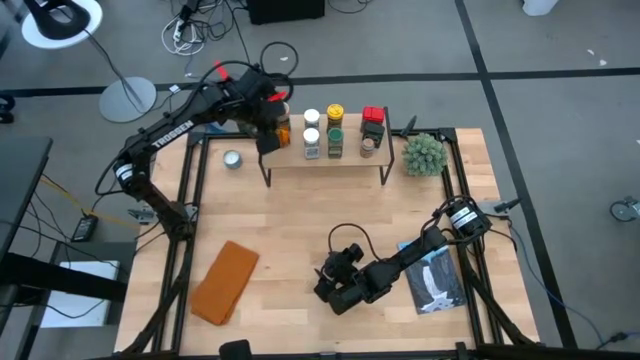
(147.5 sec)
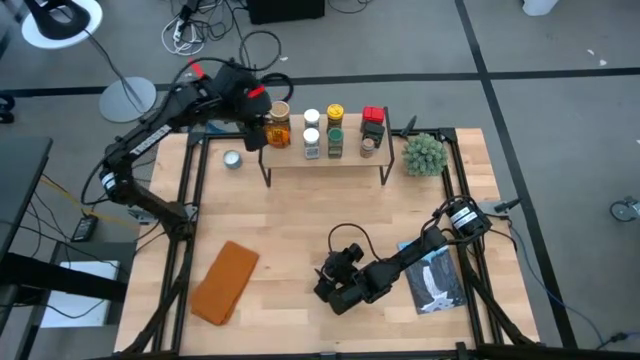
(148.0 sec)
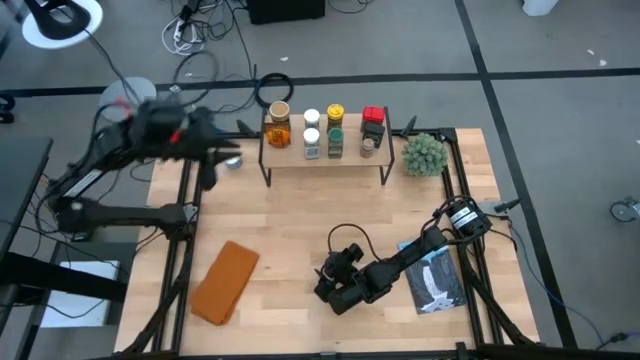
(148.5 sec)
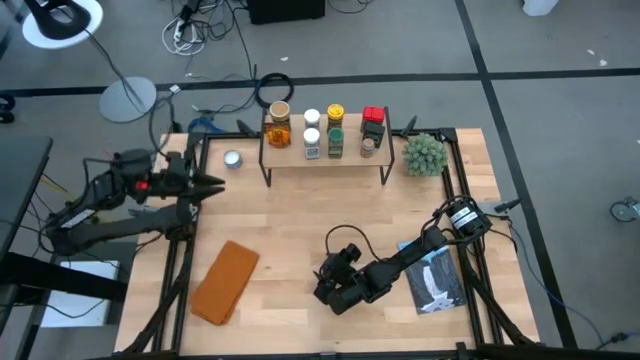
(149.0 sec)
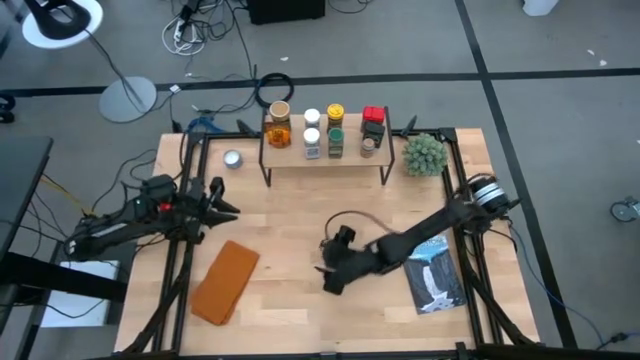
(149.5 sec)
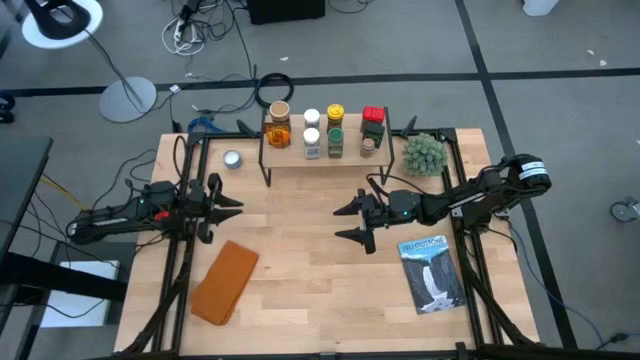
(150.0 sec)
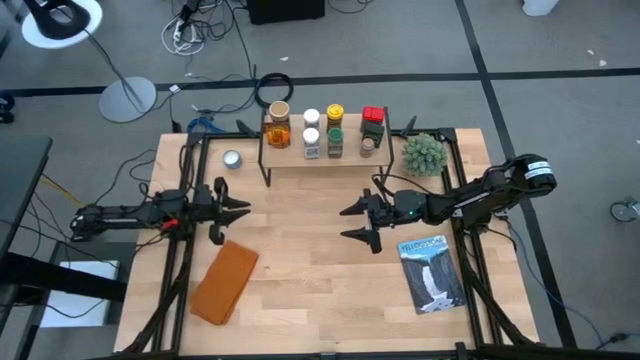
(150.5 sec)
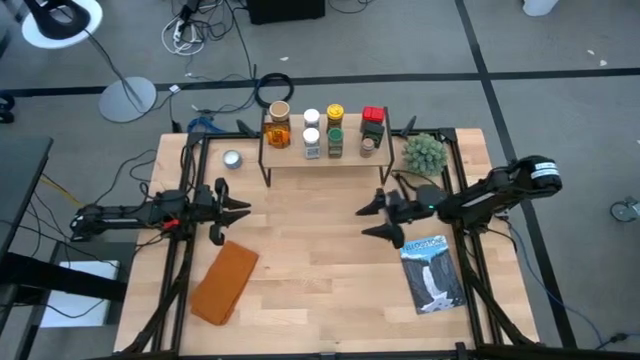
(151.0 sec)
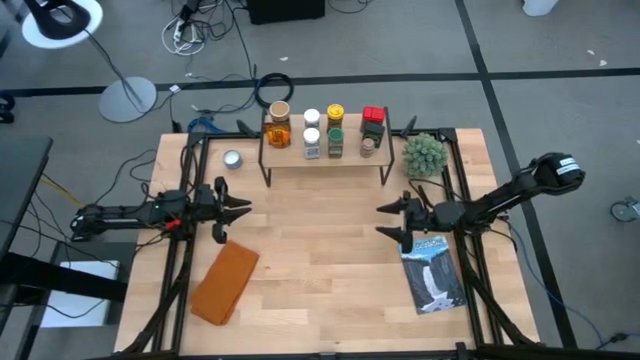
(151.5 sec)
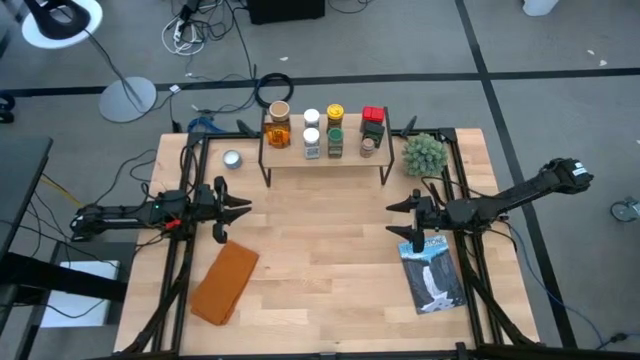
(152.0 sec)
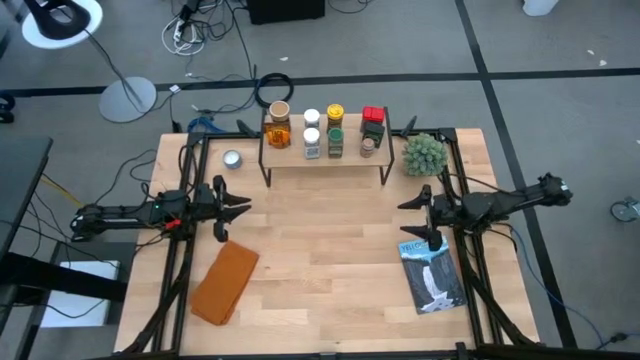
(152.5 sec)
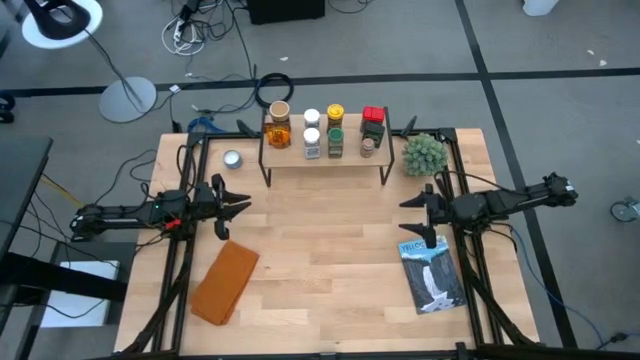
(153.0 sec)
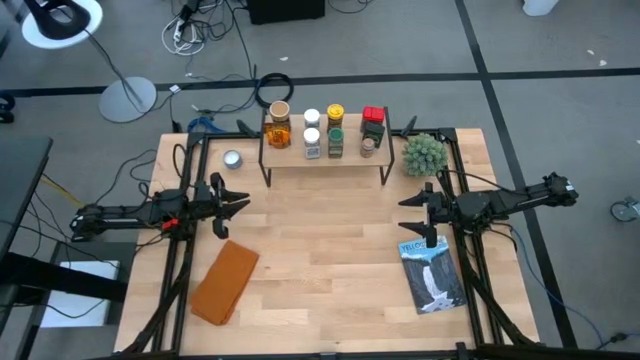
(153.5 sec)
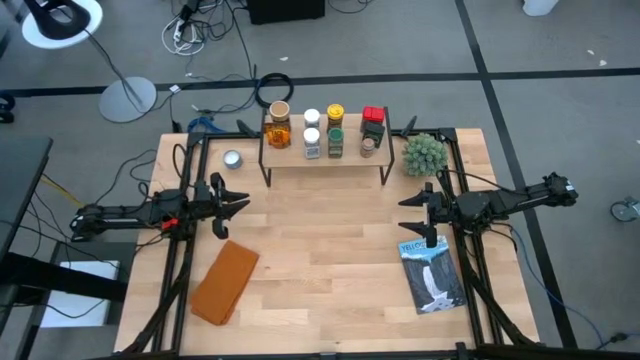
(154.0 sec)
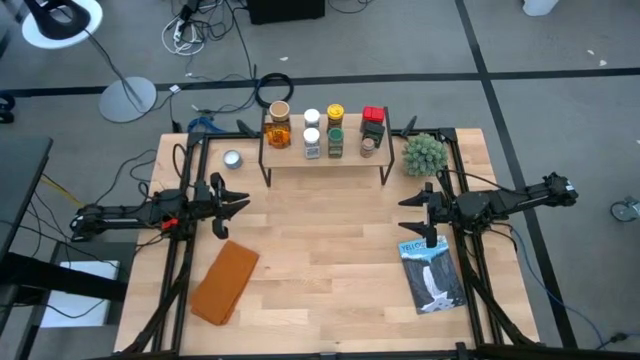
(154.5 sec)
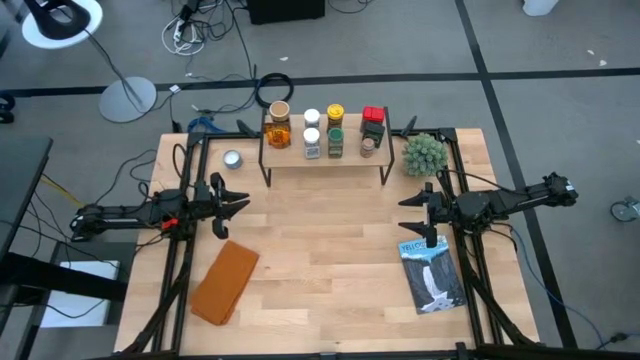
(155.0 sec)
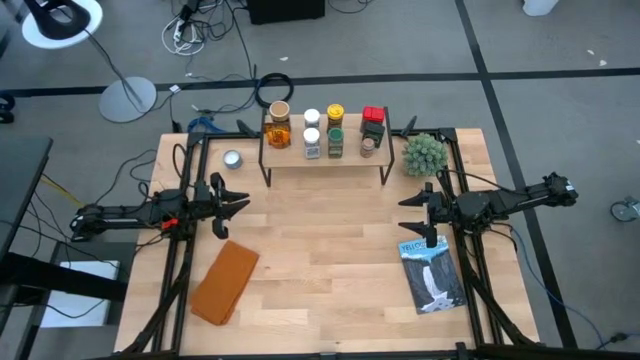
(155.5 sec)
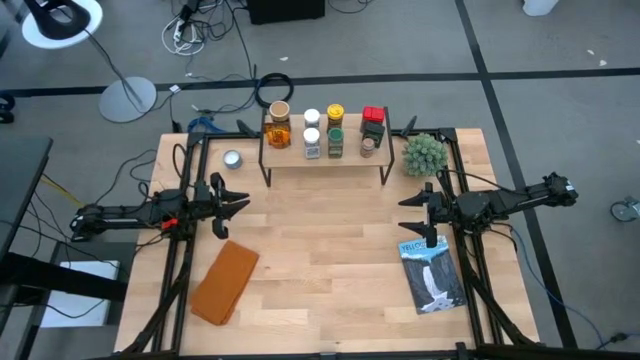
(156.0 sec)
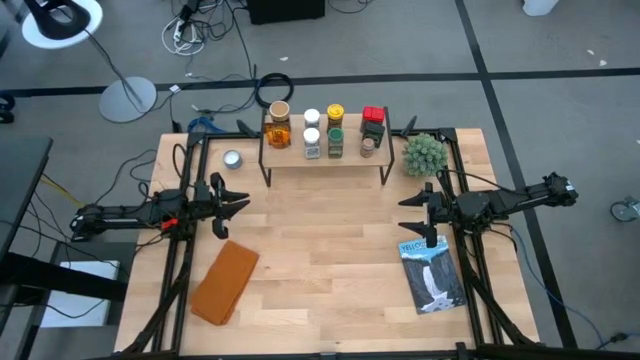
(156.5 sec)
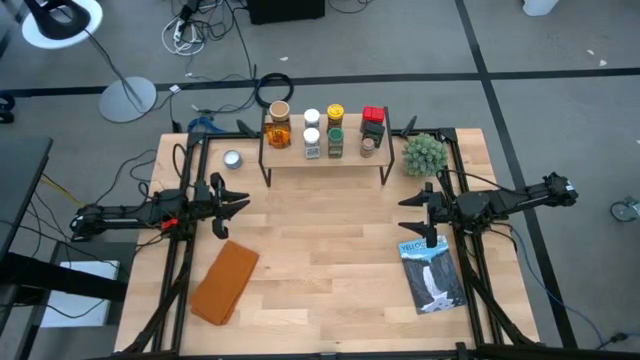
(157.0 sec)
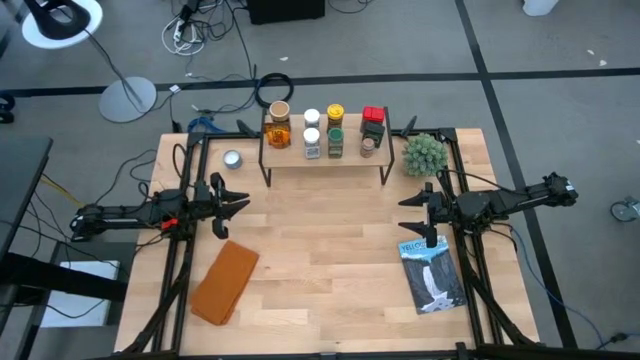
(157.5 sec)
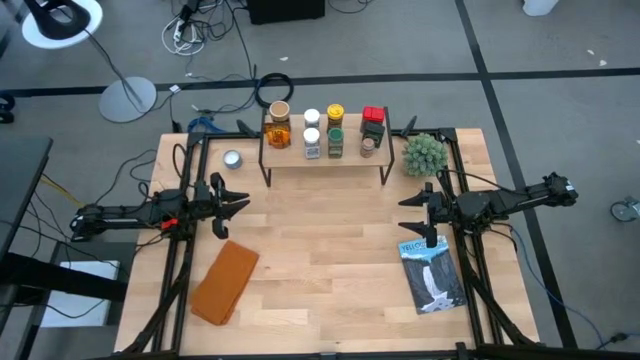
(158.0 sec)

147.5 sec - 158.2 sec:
Task: Shelf spices
Return to Home Position

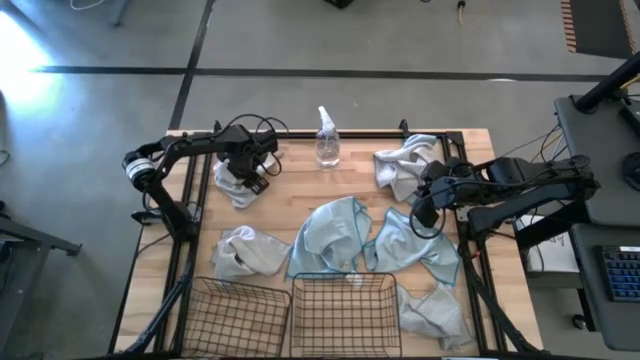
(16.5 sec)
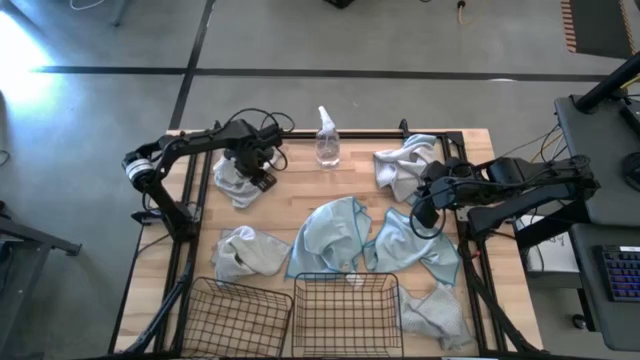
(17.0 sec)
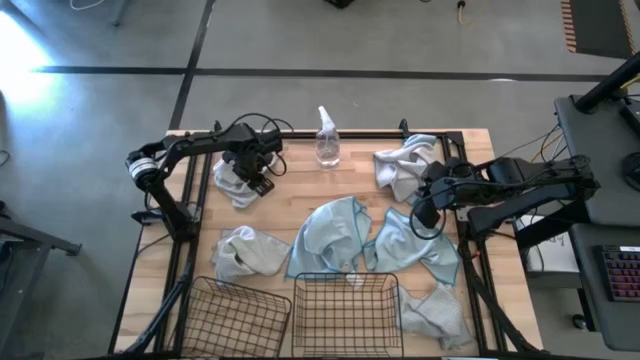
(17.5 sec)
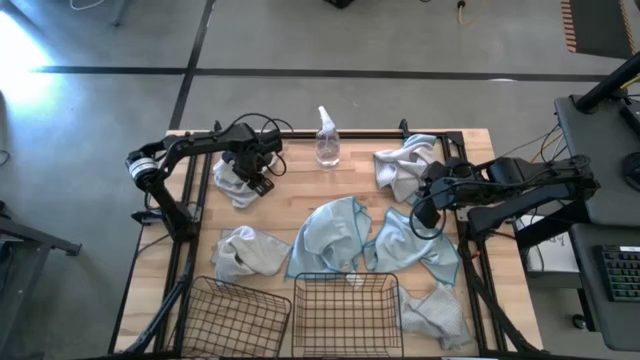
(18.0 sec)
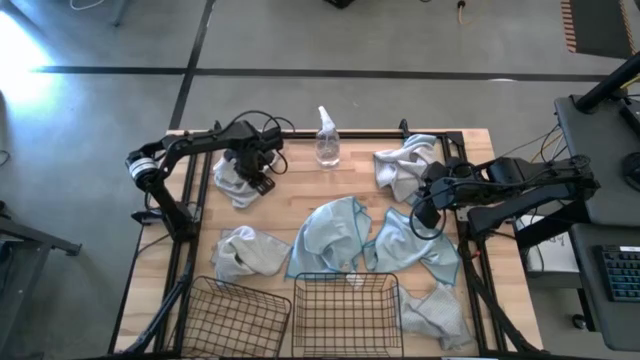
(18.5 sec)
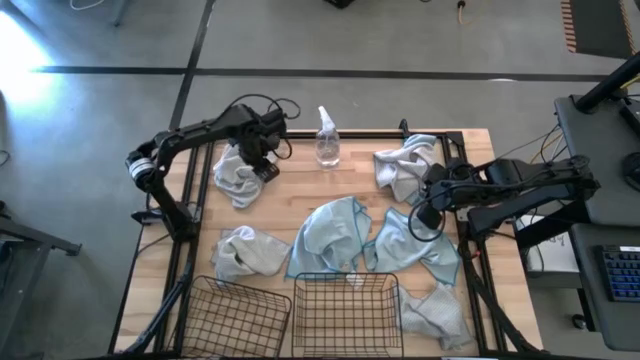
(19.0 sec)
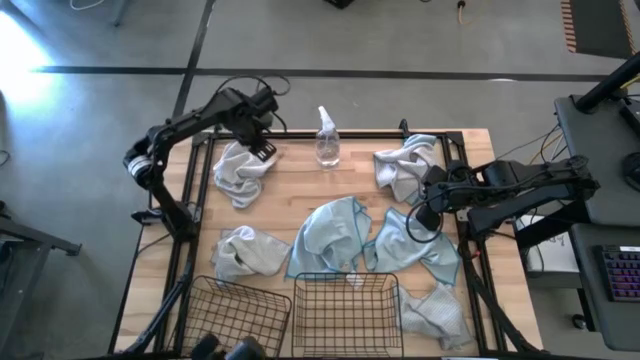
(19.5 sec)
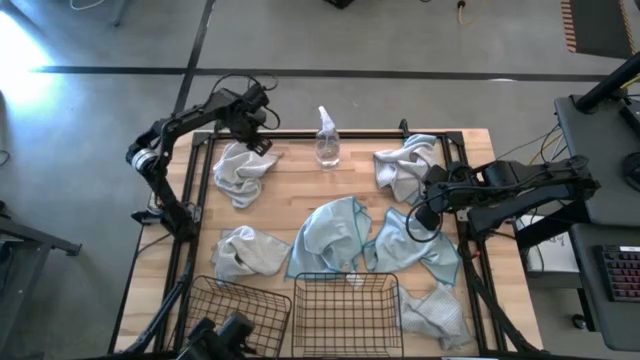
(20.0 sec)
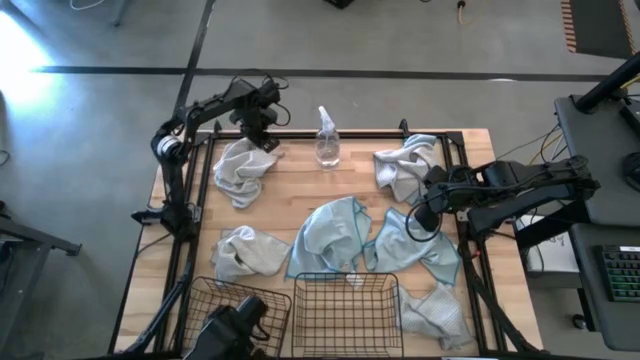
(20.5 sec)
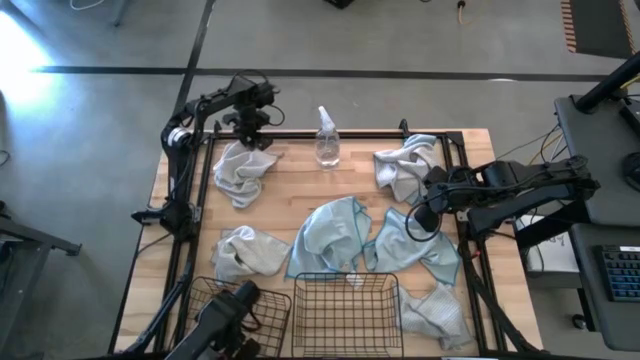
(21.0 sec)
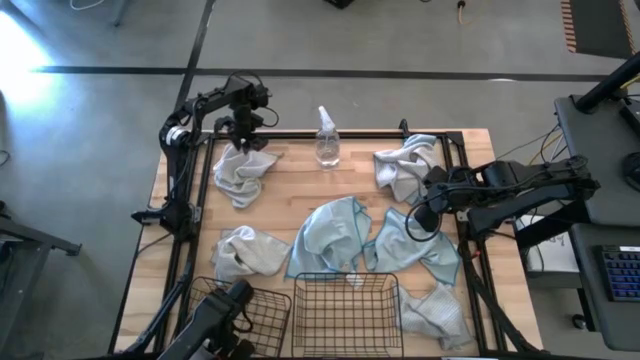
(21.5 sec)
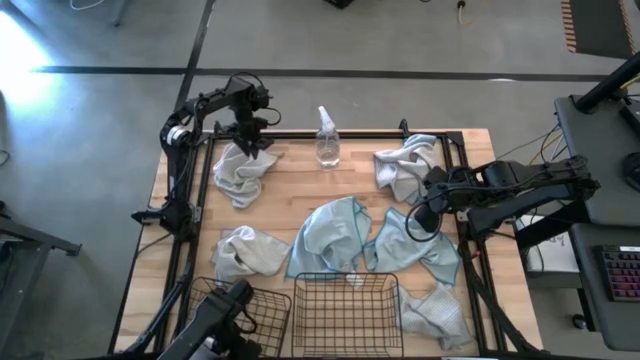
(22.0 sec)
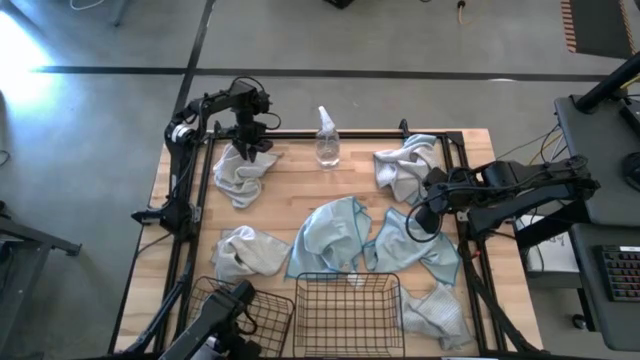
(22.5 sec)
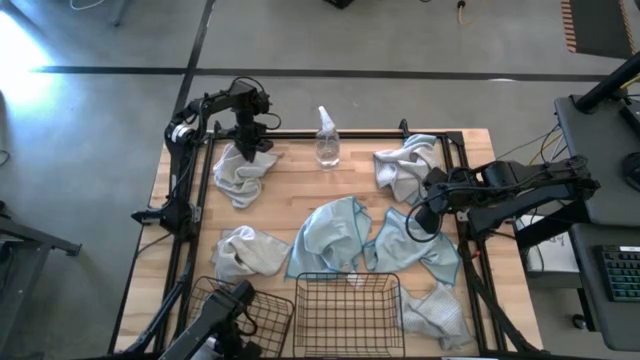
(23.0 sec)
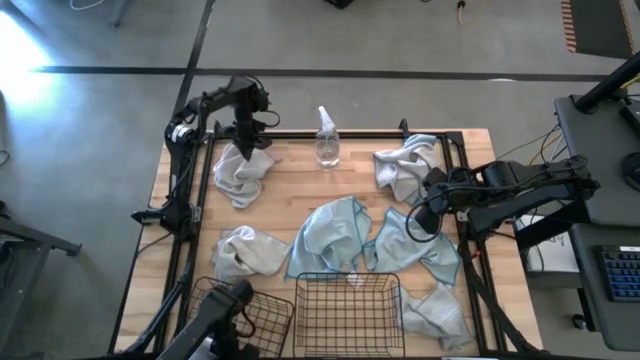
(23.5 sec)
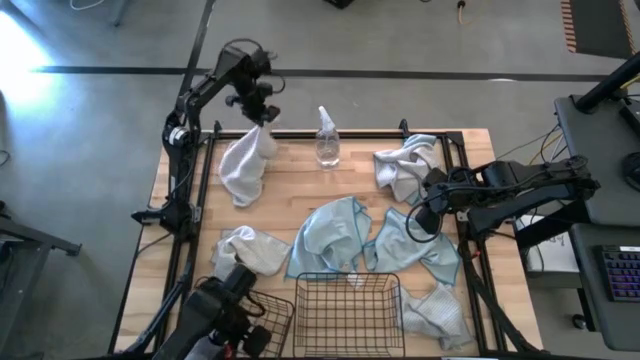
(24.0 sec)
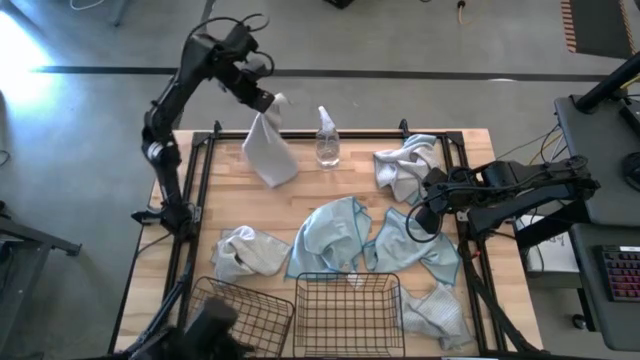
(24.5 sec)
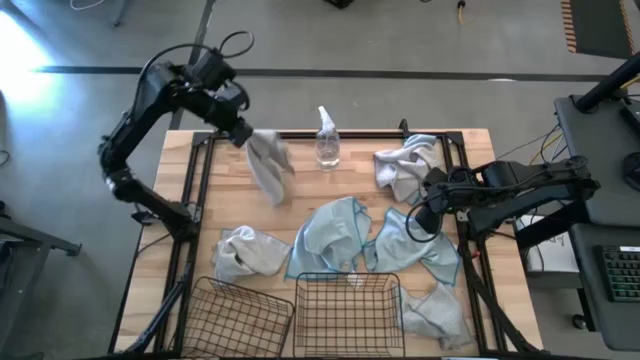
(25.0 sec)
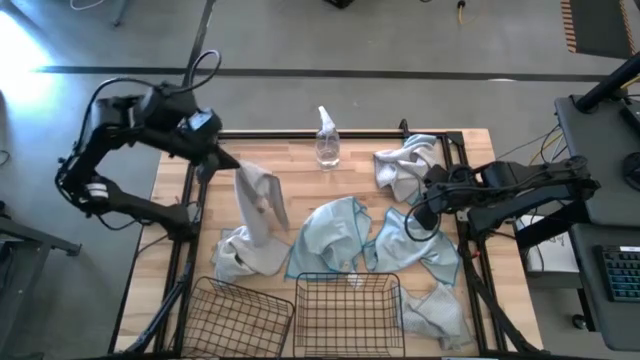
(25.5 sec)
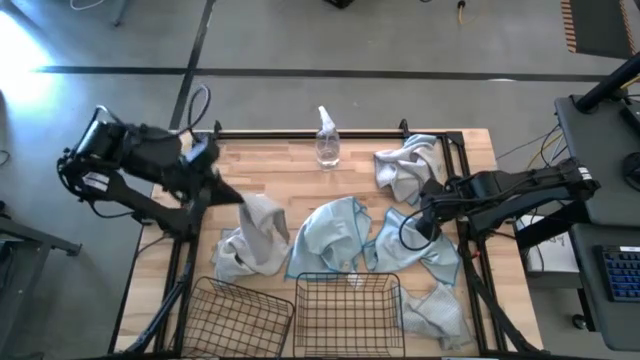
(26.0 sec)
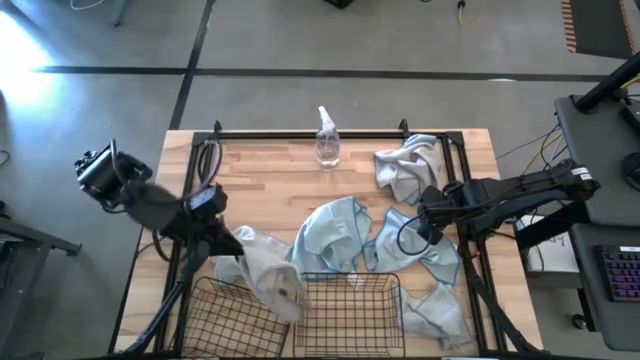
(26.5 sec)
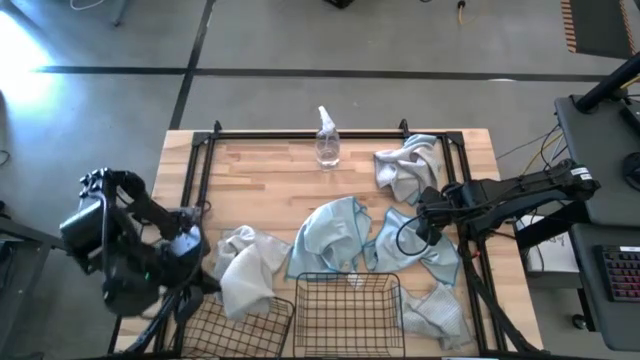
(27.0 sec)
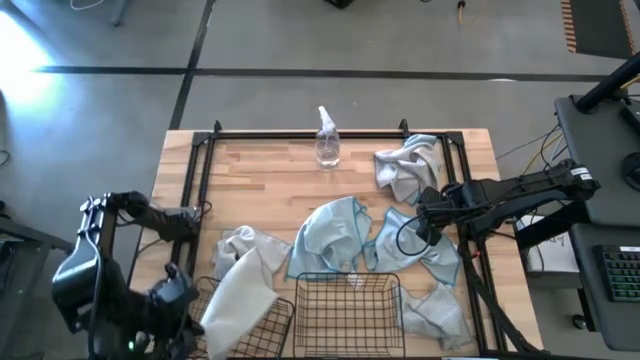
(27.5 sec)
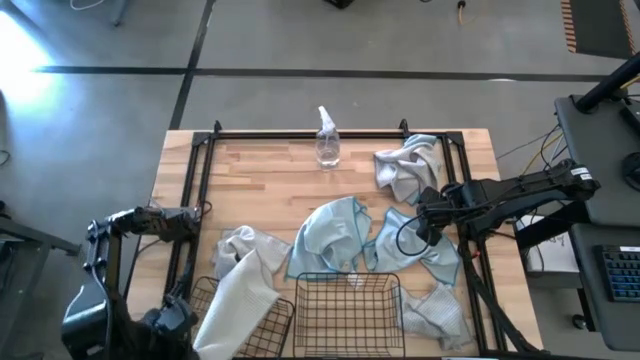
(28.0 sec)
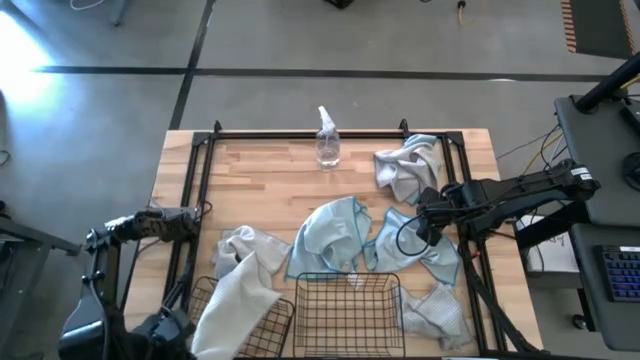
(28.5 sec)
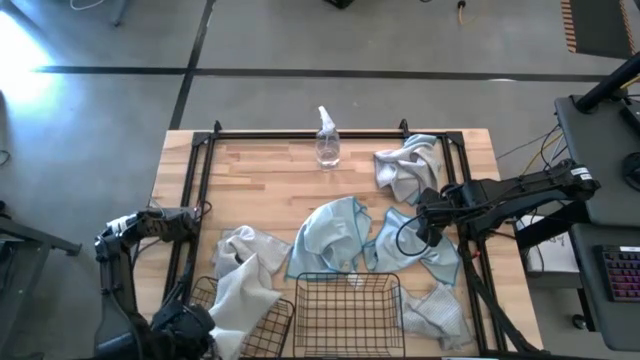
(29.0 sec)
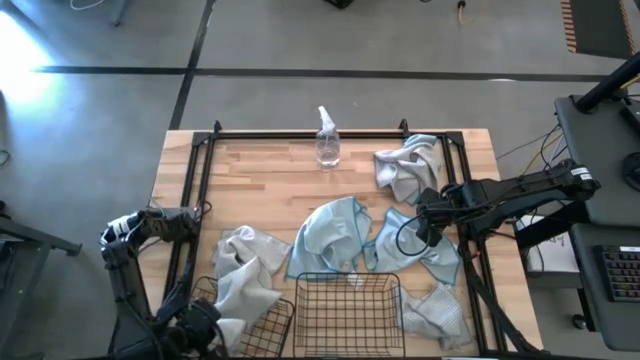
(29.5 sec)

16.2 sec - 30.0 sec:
Task: Sort microfiber towel by color & place in baskets
Put the top left gray microfiber towel into the left black wire basket
